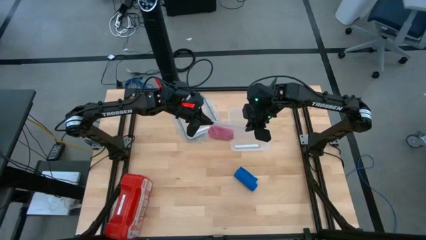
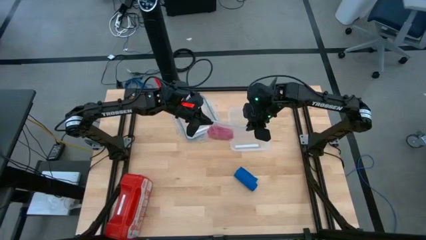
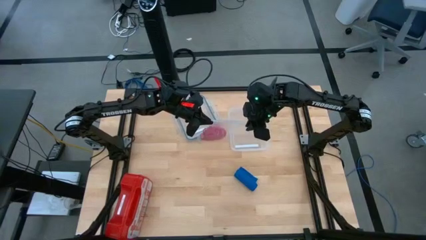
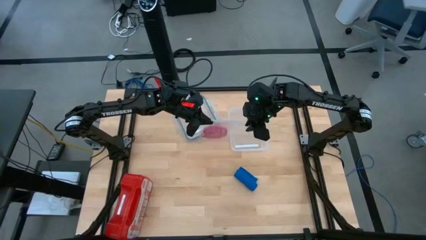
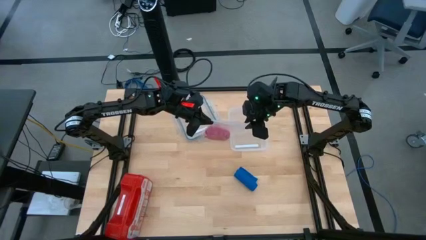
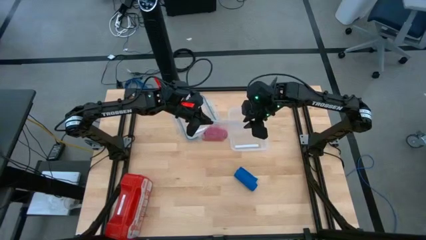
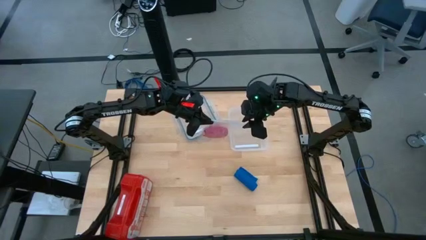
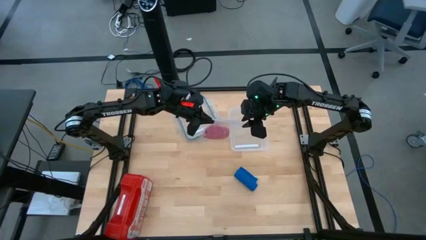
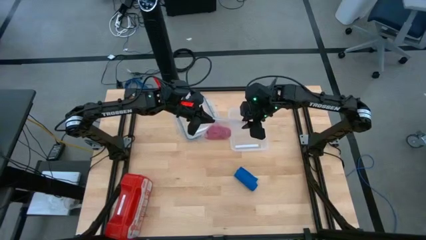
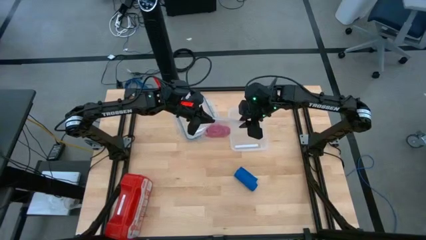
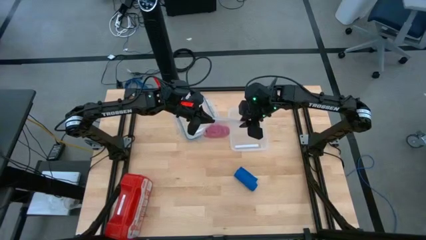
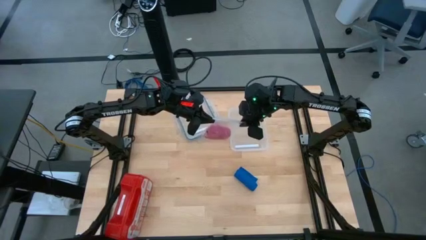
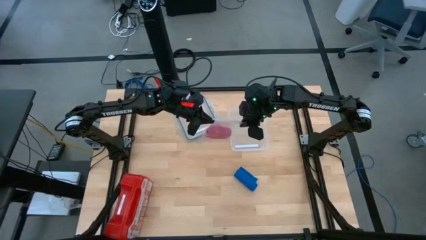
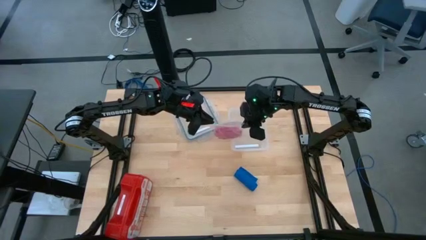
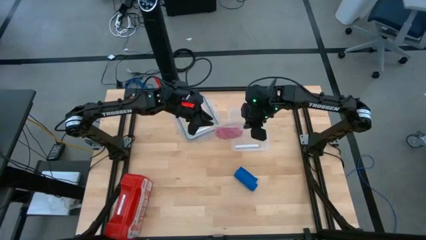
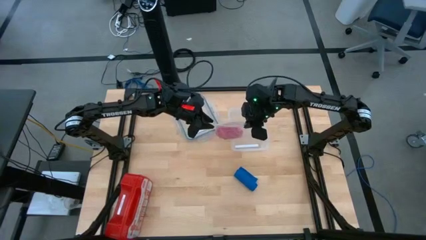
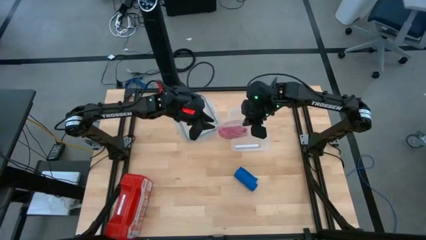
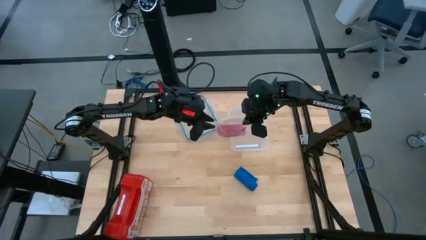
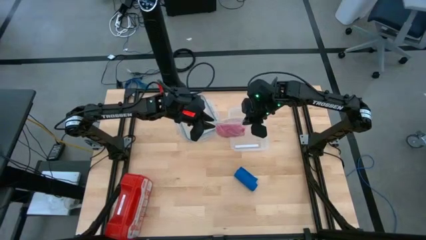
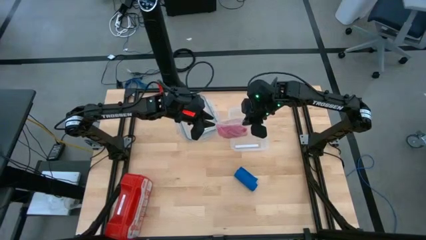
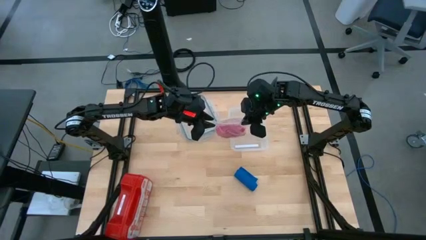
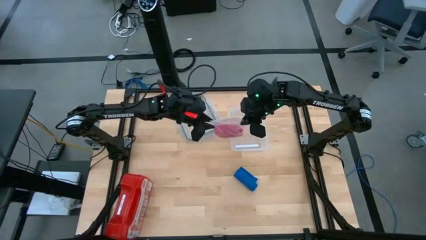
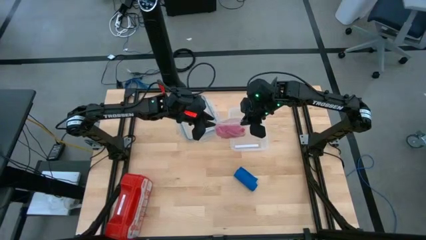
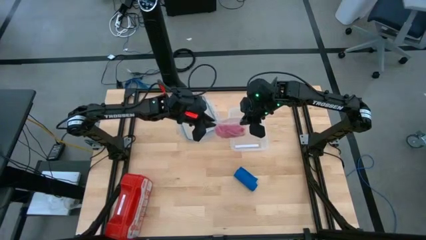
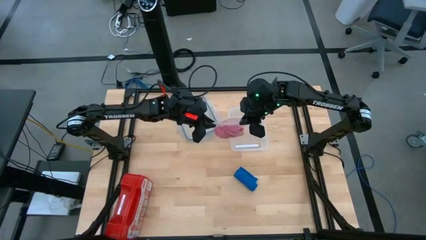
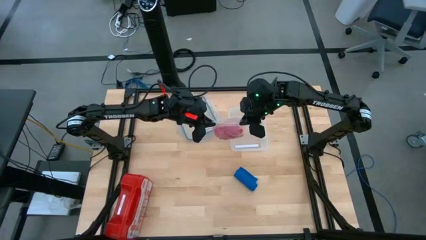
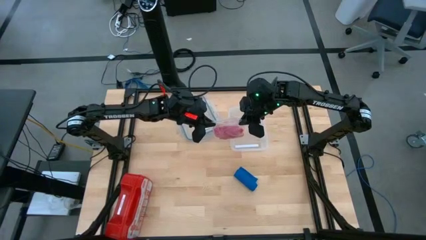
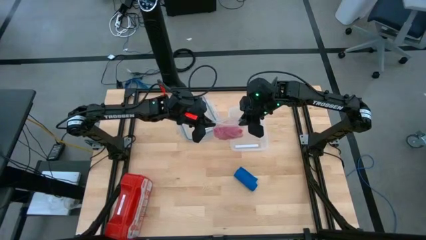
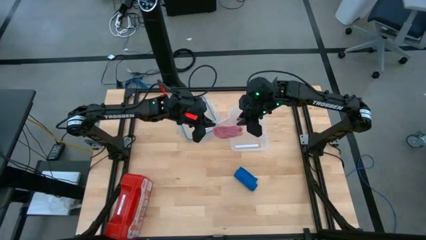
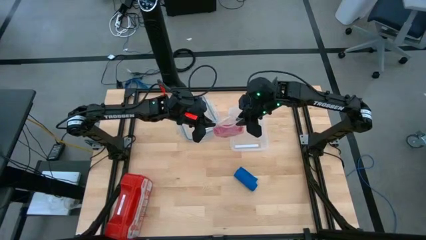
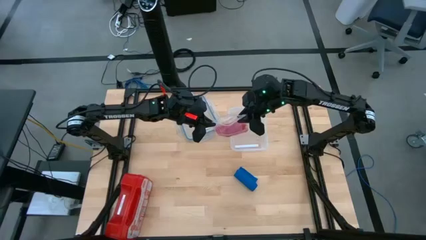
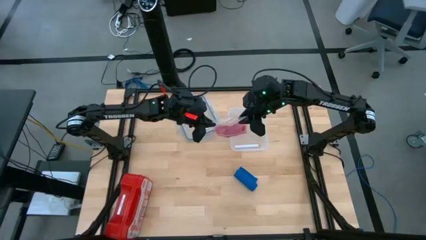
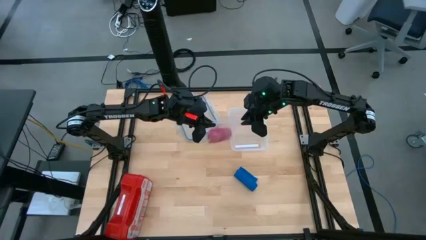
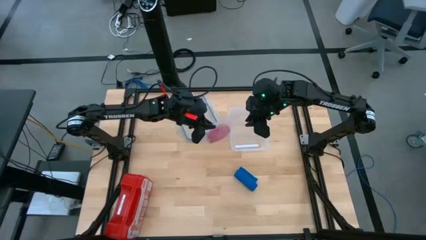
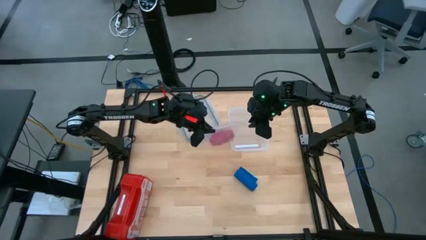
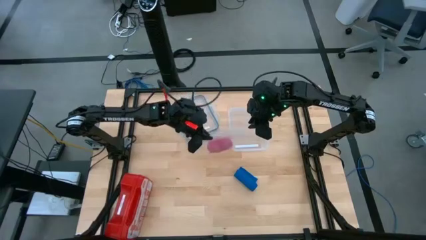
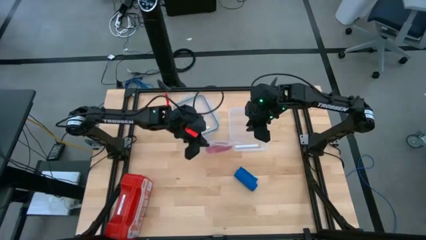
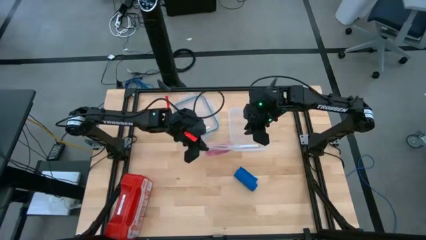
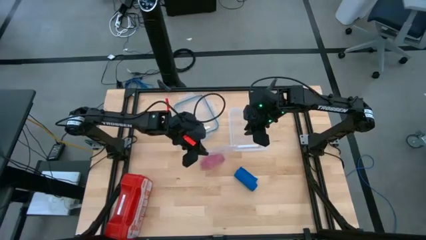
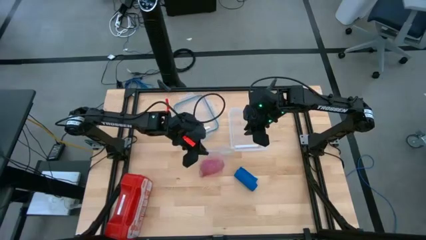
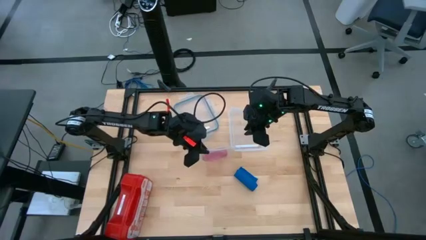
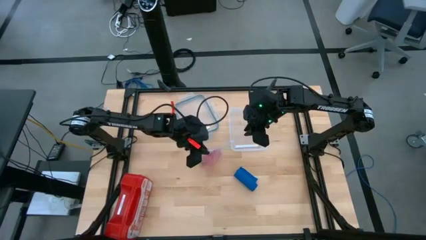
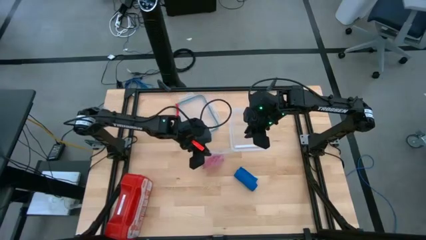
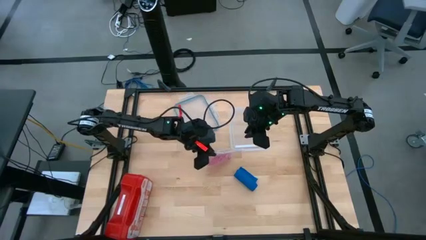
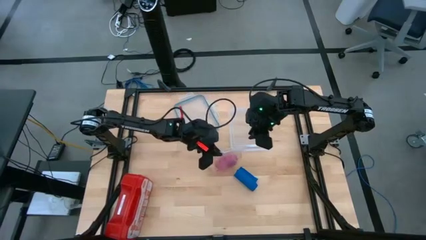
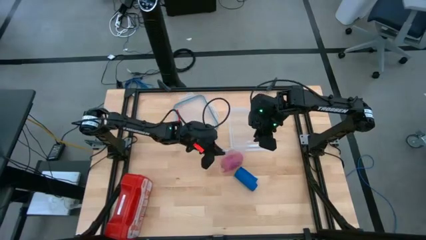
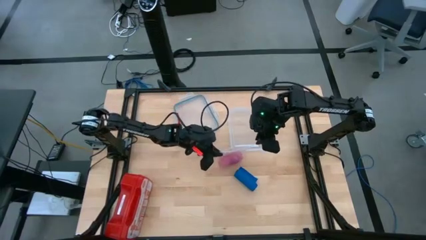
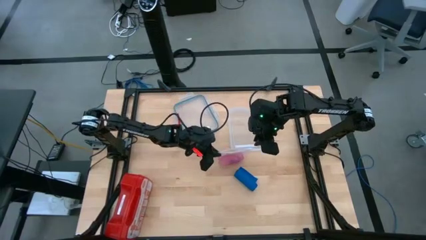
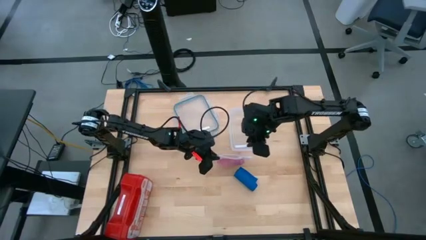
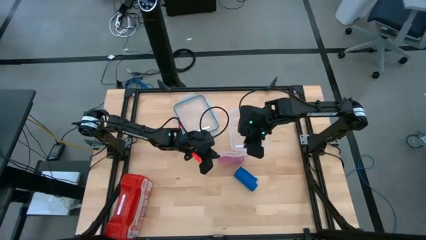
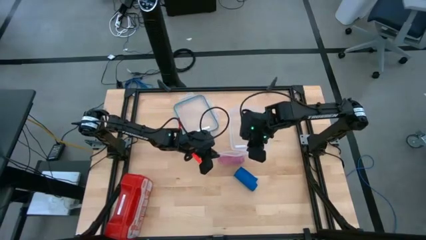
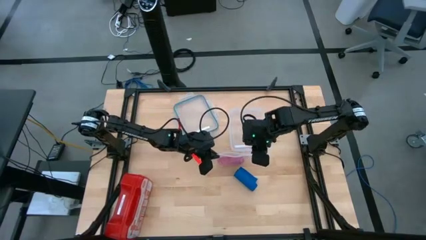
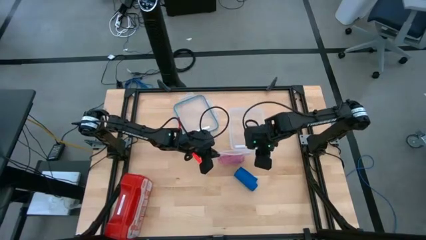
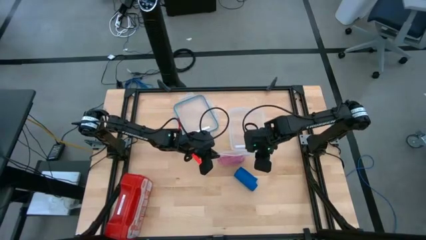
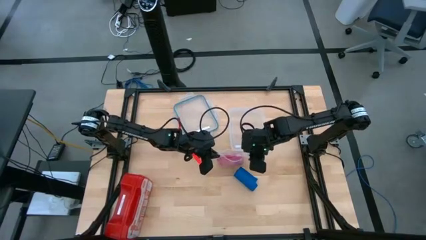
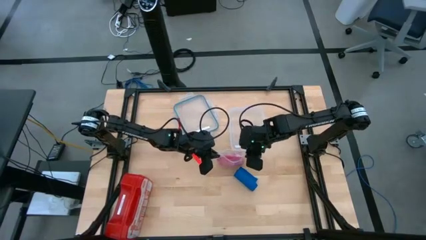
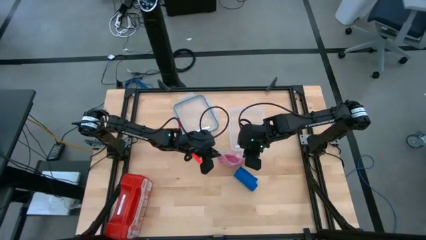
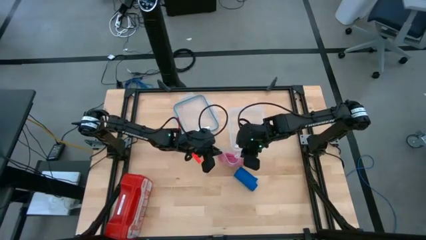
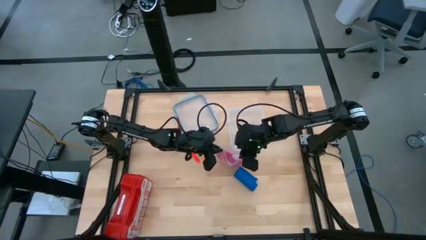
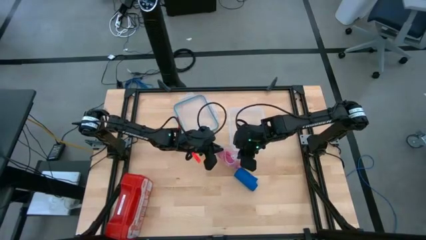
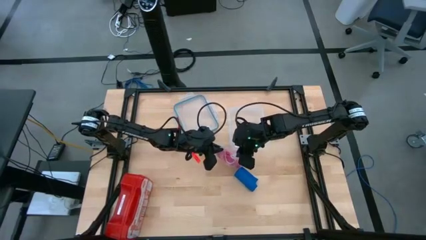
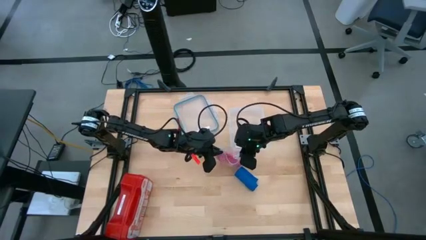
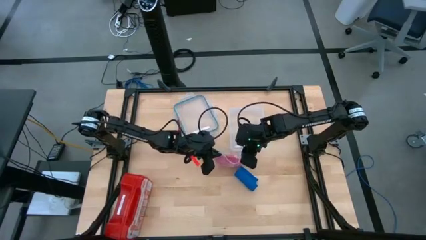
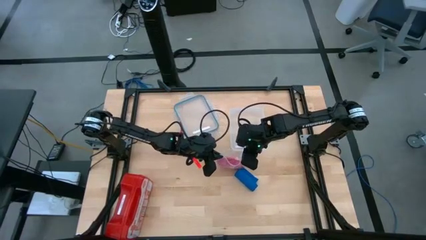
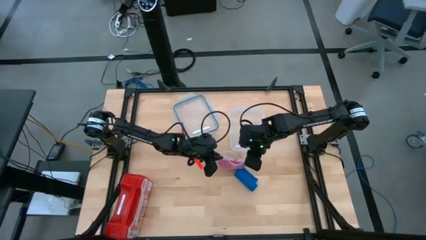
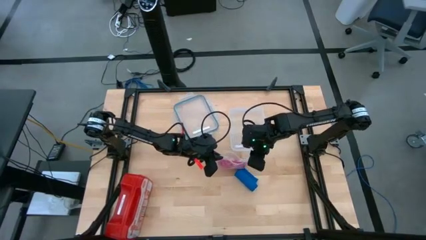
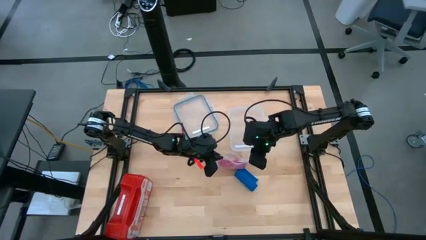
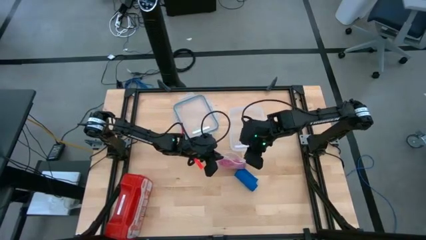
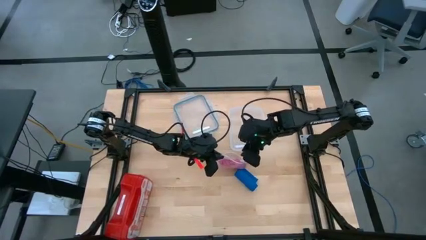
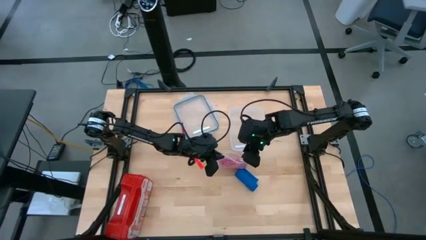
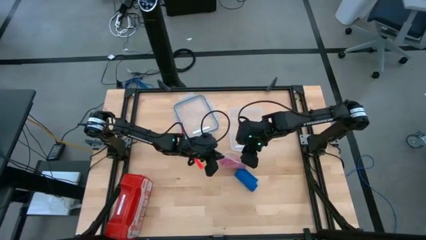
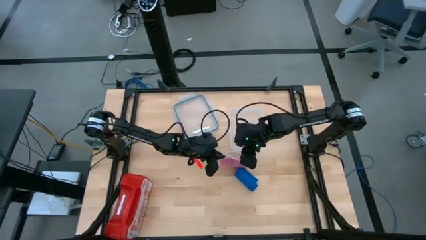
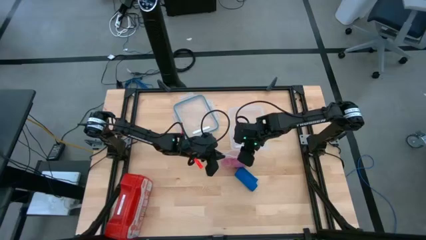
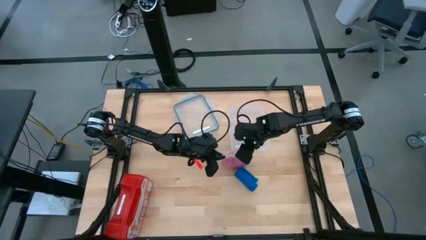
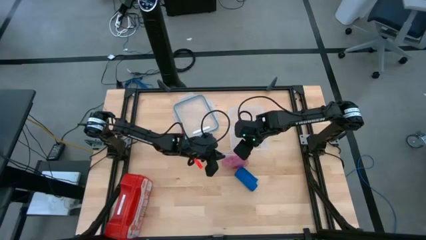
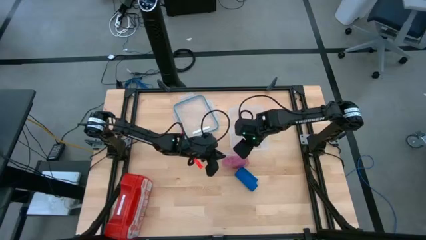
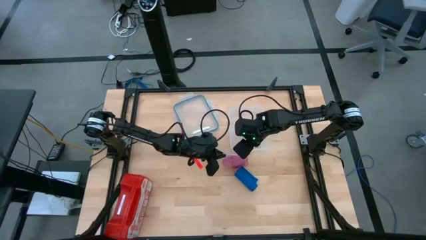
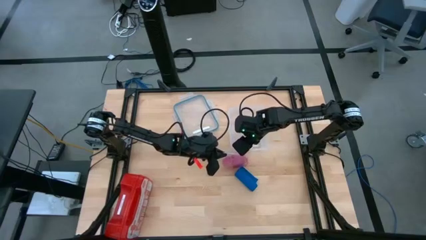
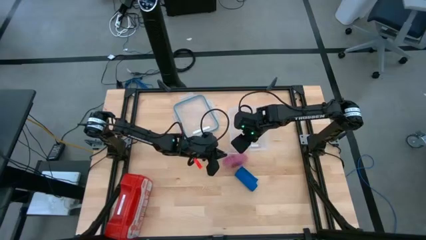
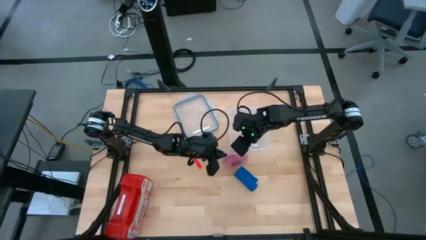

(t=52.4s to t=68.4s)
Task: Roll bandage
Open the transparent zip bag
